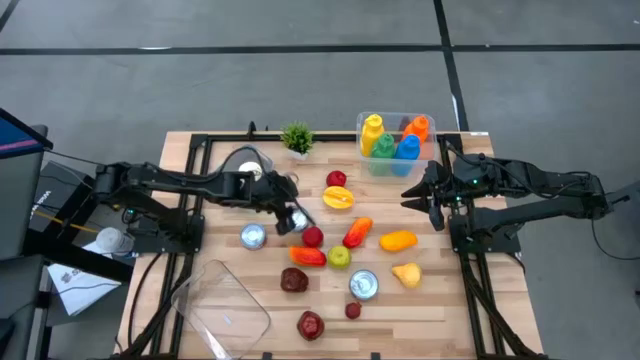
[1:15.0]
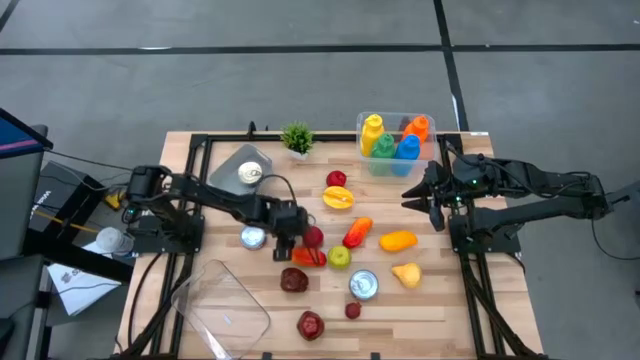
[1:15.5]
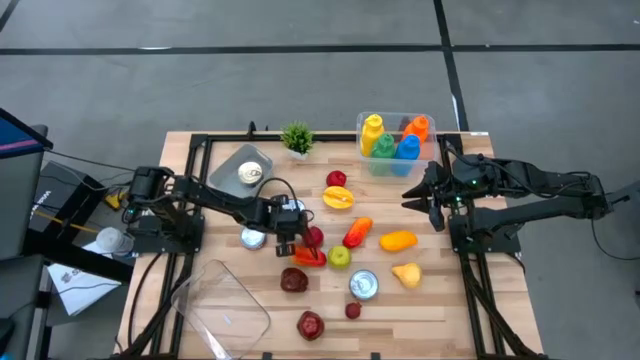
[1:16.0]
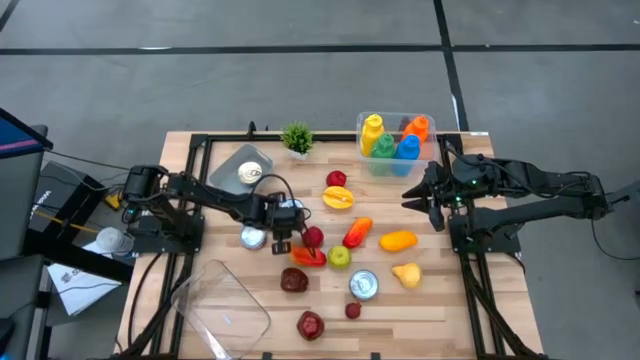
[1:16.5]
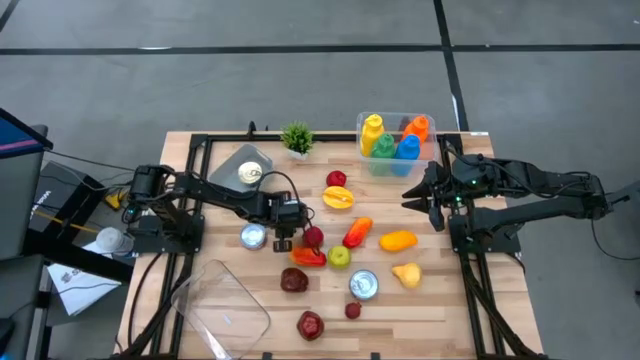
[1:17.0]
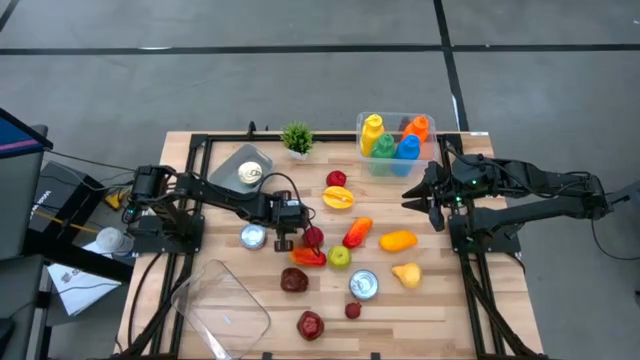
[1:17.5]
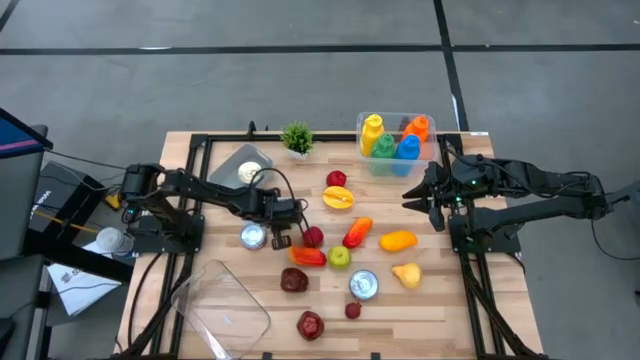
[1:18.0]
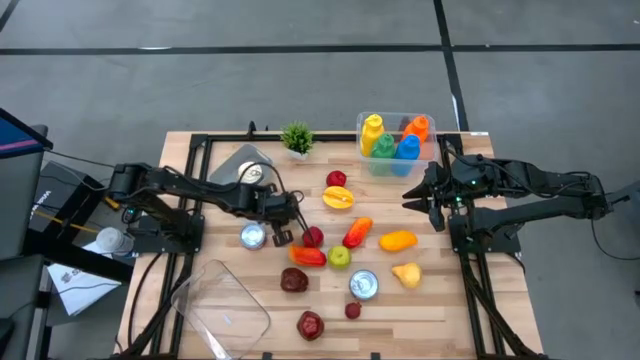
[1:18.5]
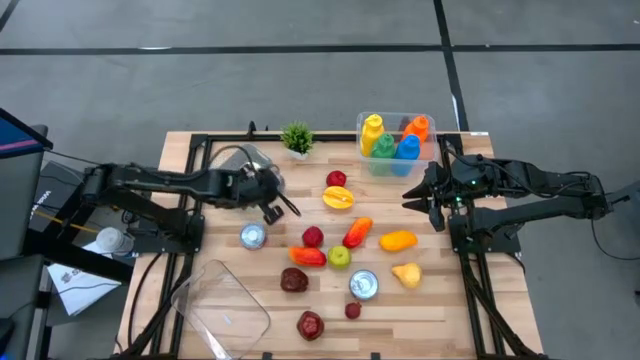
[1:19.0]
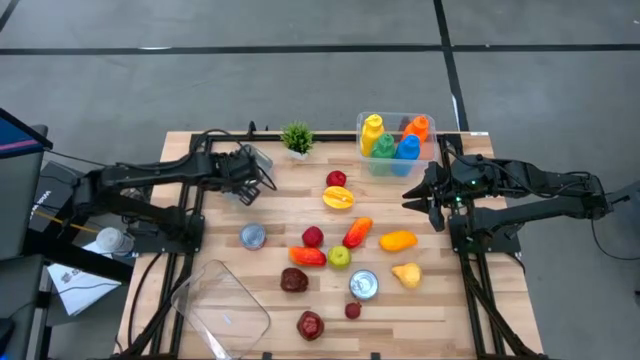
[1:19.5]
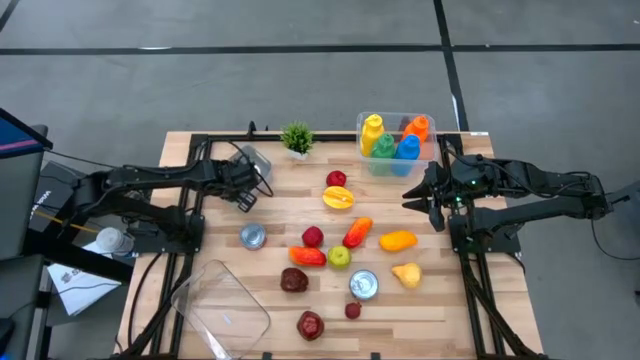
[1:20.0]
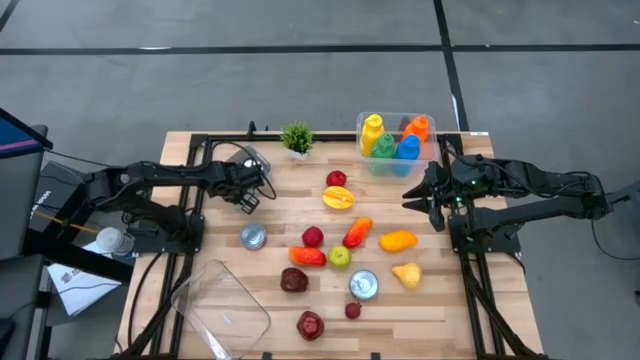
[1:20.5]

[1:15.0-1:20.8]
Task: Pick & Place Food Item
Put the green tuna can into the gray bin

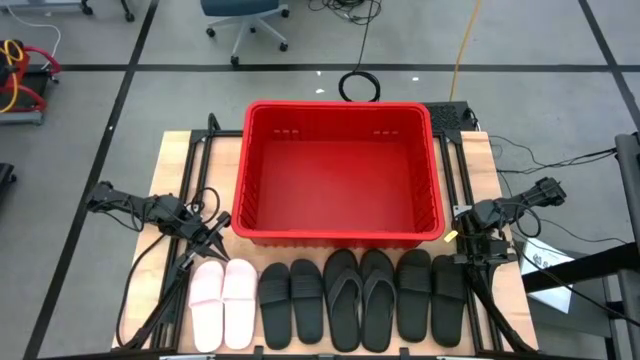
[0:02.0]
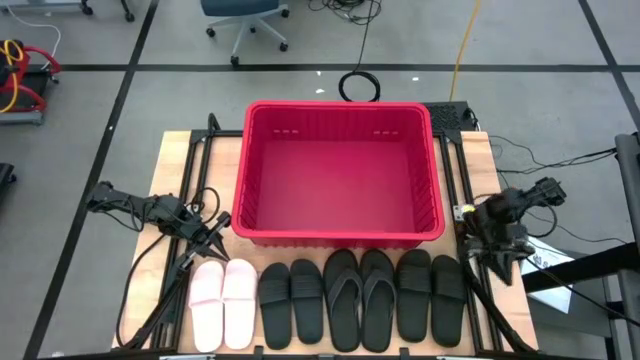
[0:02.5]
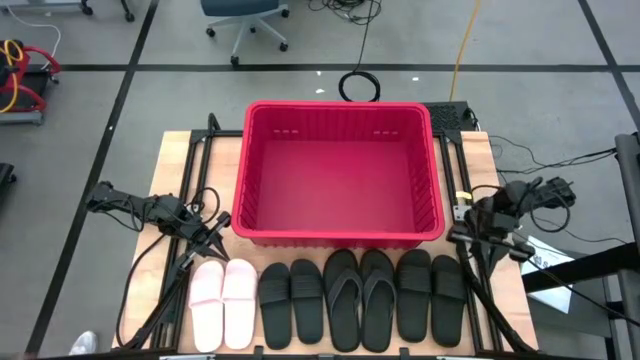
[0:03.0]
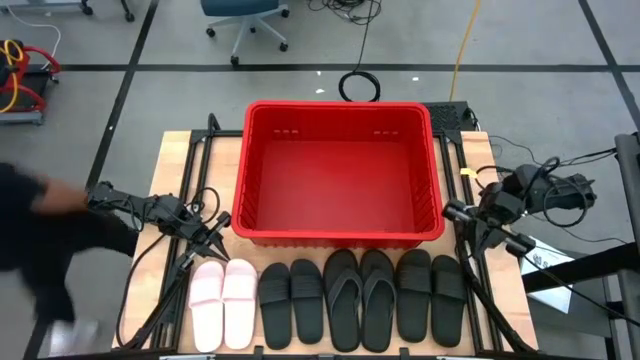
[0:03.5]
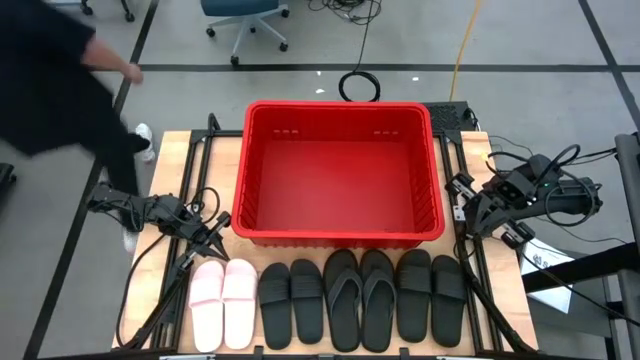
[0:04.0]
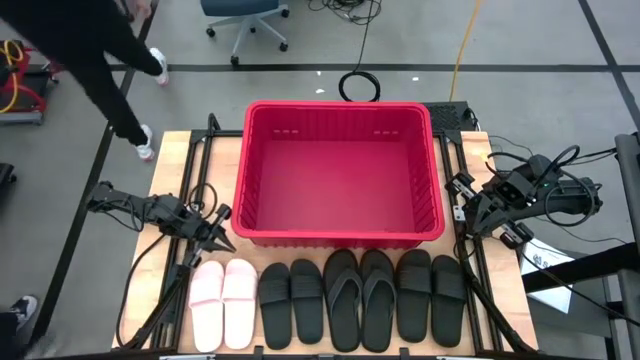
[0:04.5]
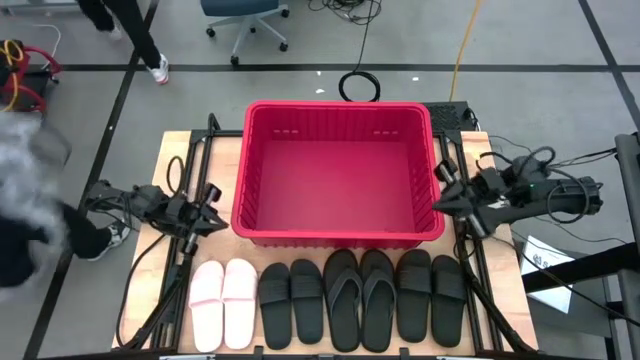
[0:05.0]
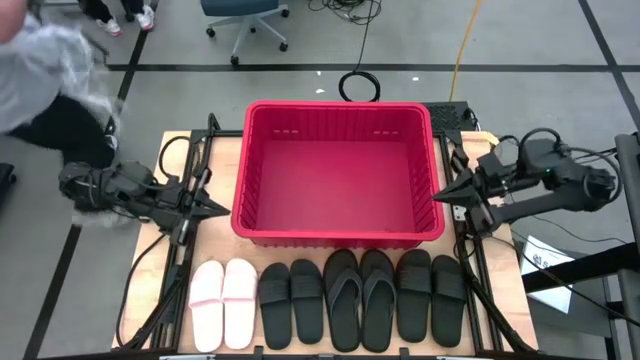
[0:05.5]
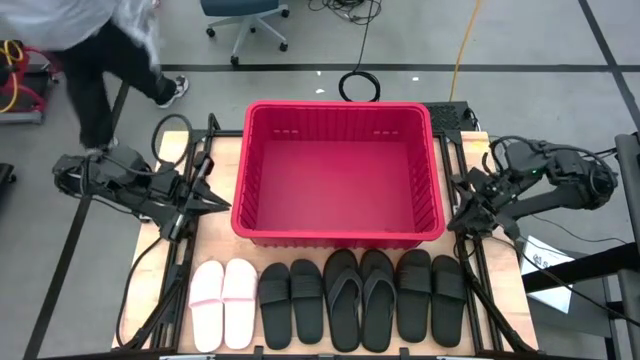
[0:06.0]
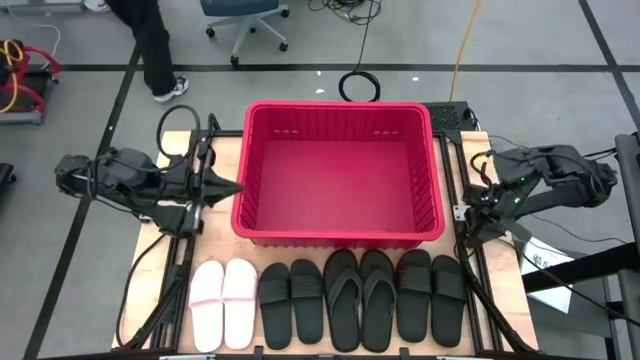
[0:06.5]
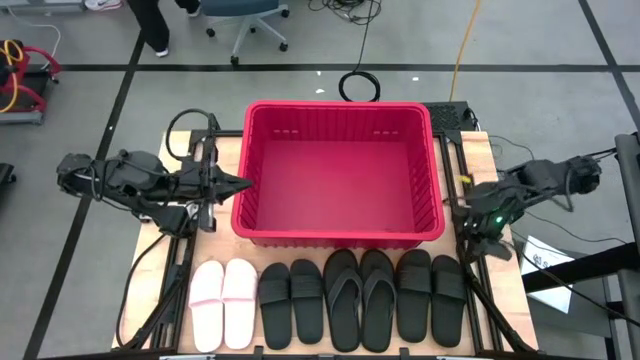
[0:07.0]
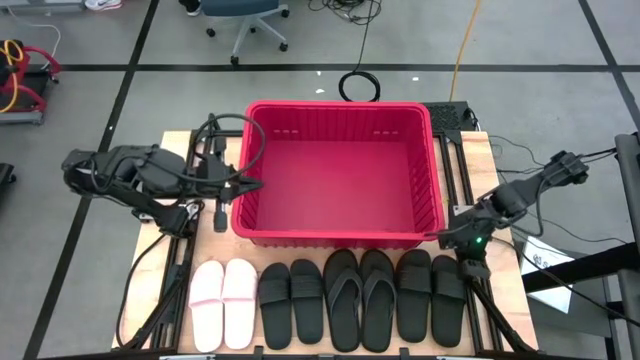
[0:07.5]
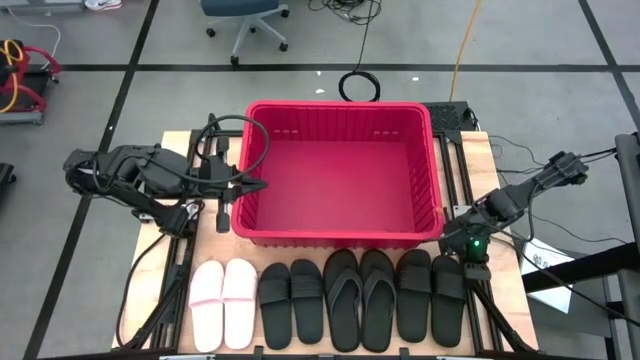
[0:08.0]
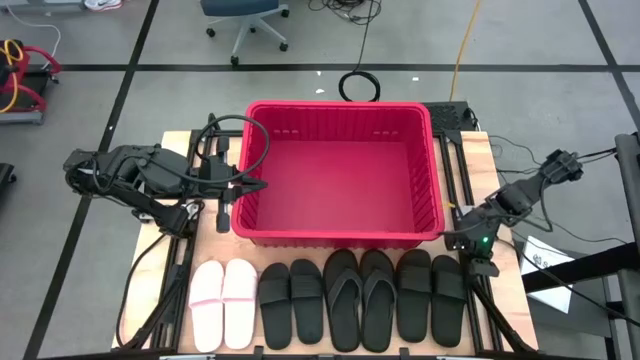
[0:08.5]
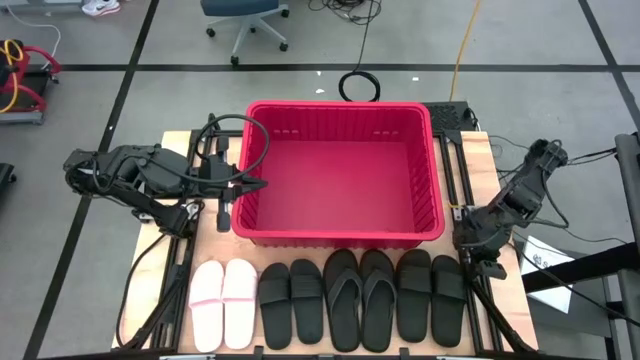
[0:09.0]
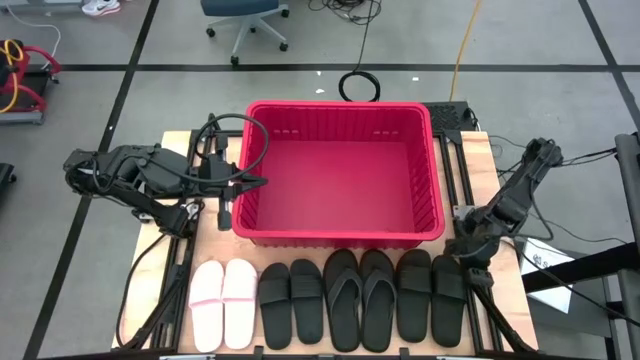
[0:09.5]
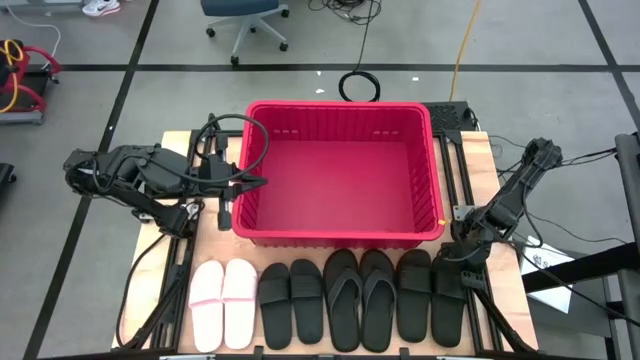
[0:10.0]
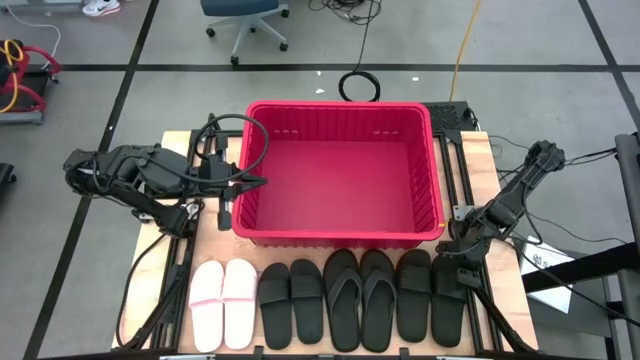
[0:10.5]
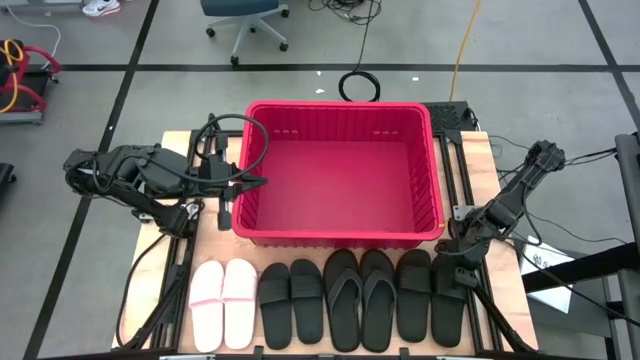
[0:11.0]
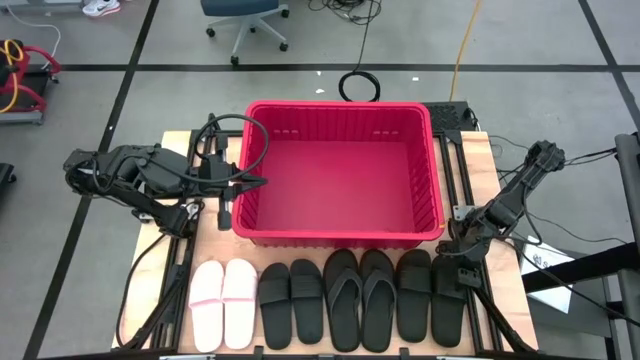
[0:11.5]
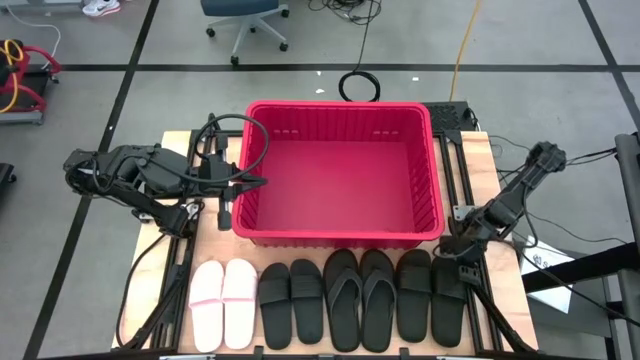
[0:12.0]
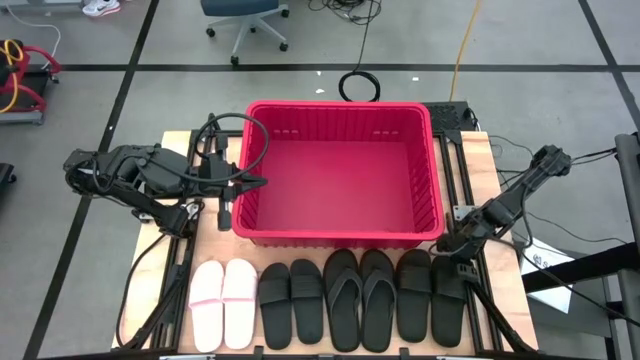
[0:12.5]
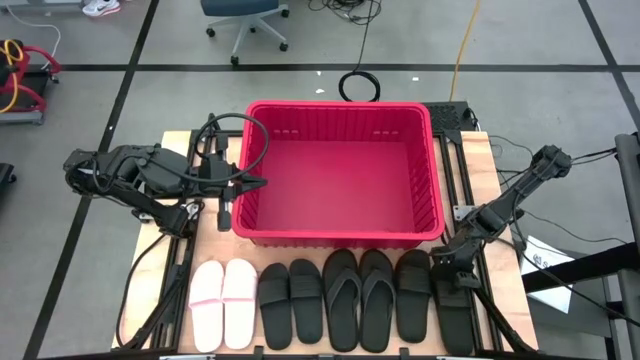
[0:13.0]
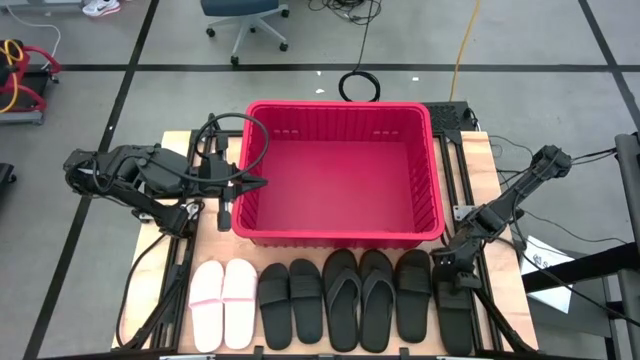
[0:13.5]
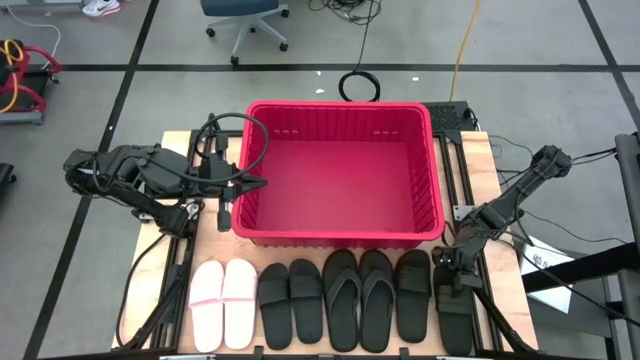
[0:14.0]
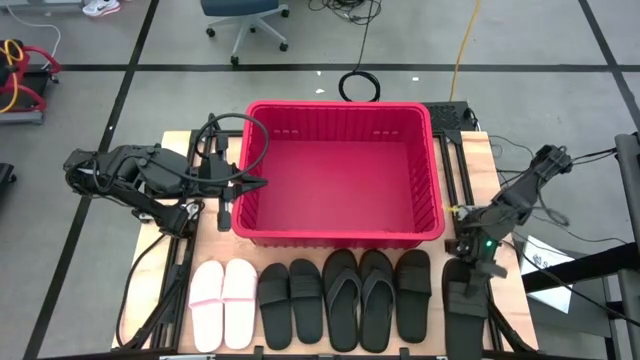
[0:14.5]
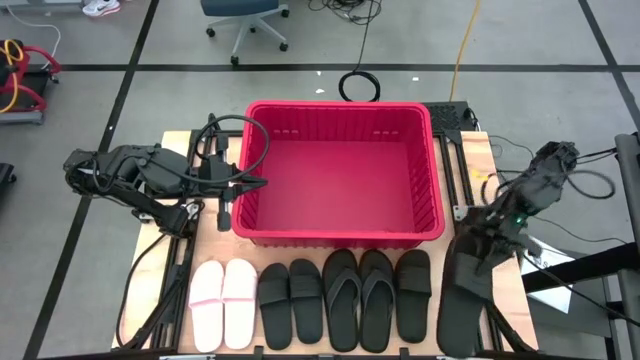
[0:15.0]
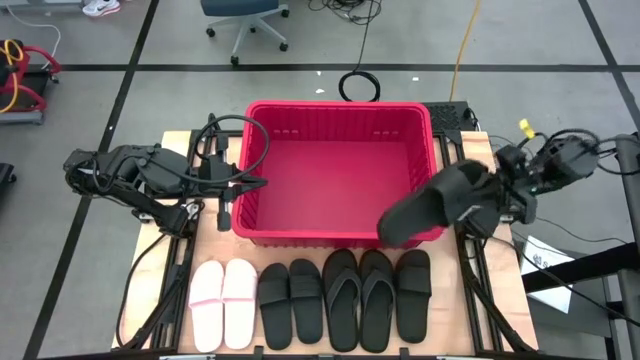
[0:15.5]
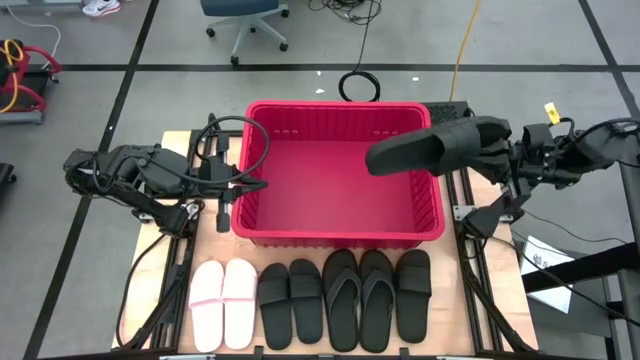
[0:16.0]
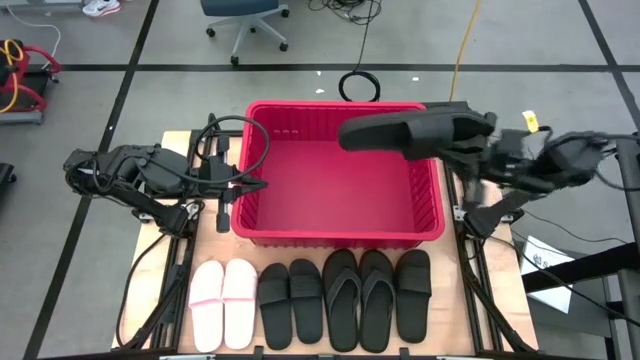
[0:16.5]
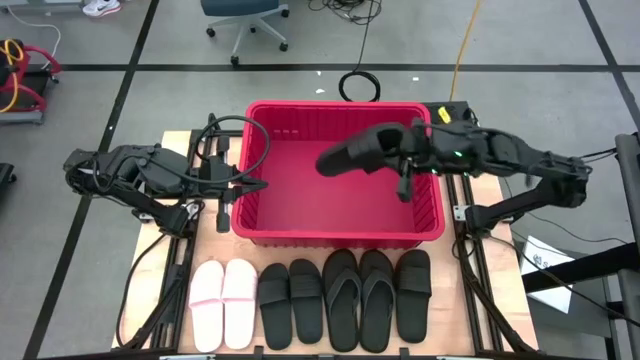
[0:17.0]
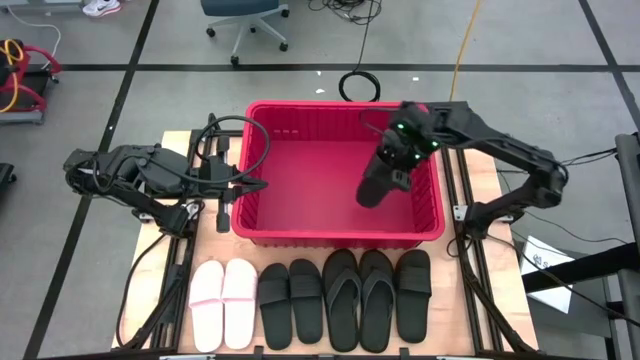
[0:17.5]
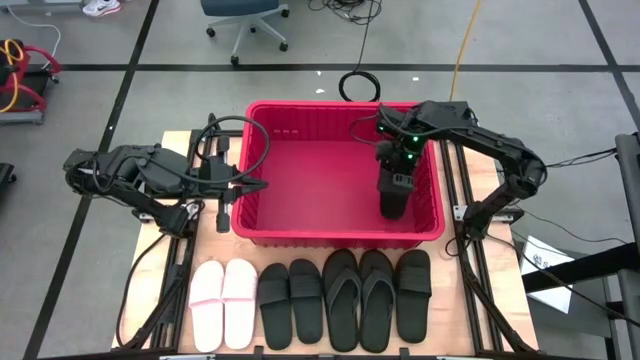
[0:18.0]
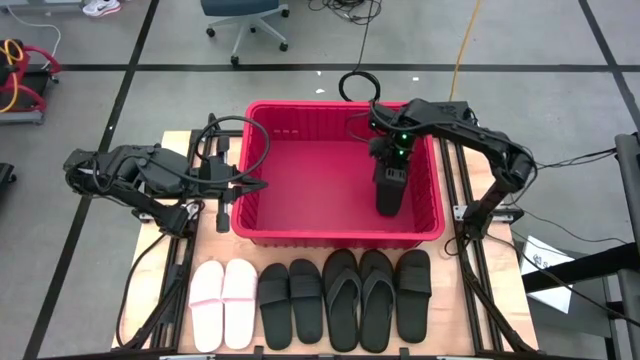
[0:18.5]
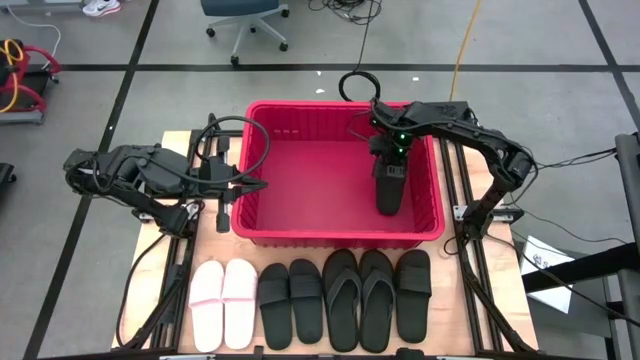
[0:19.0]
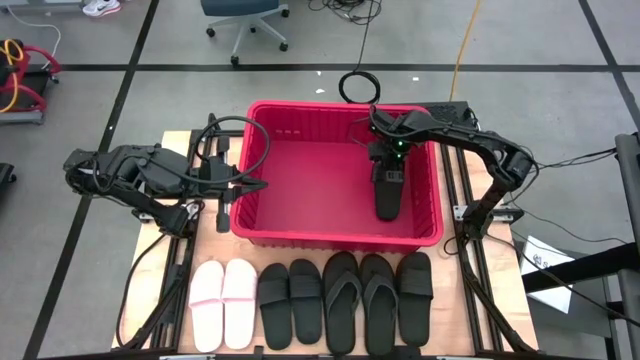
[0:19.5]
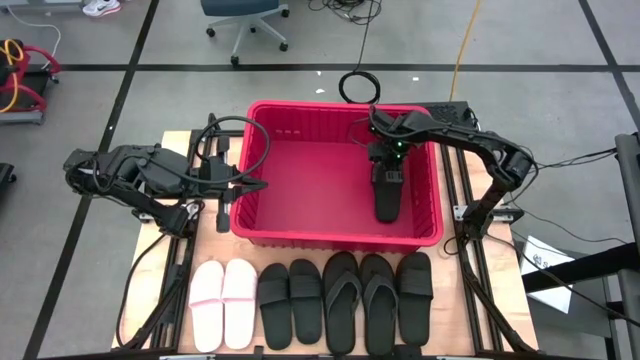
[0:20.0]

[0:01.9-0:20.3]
Task: Pick and place slides into bin
Put the black slide into the red bin
